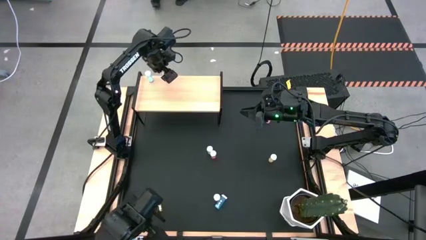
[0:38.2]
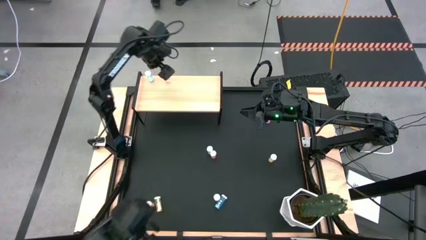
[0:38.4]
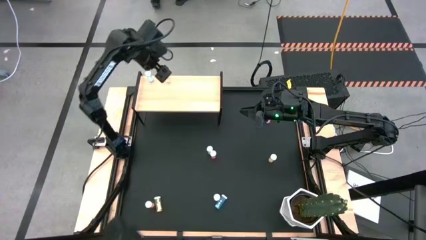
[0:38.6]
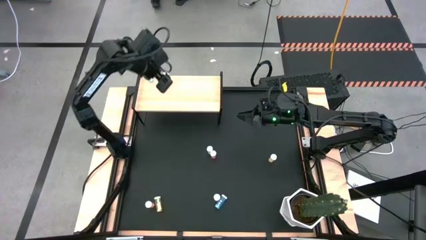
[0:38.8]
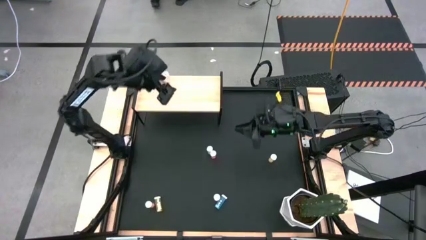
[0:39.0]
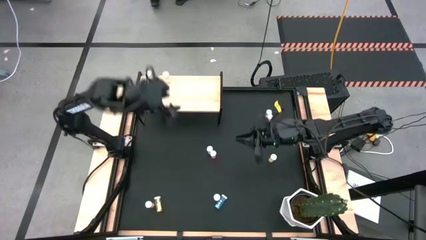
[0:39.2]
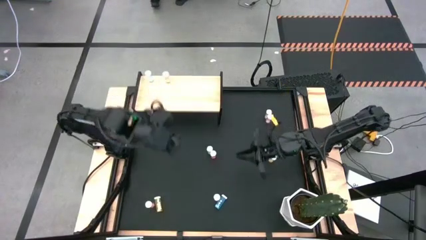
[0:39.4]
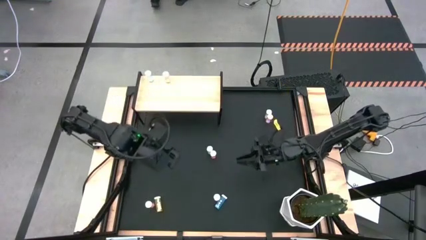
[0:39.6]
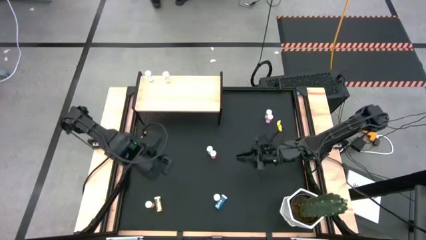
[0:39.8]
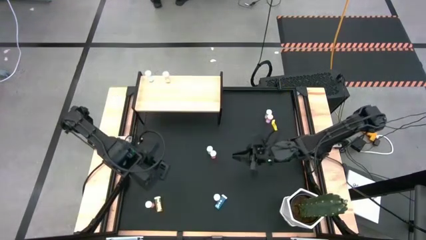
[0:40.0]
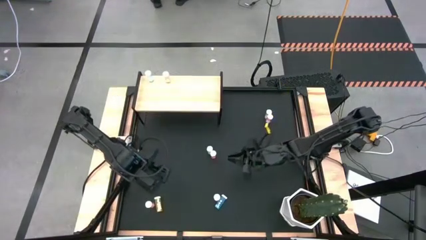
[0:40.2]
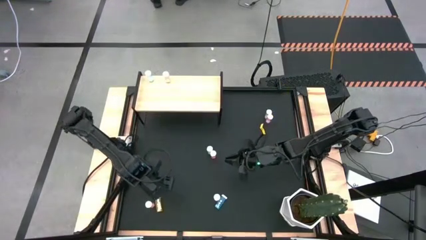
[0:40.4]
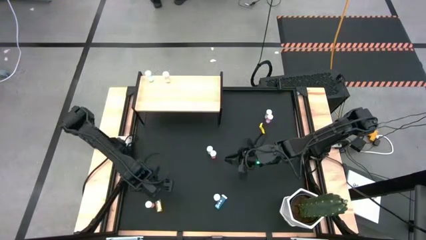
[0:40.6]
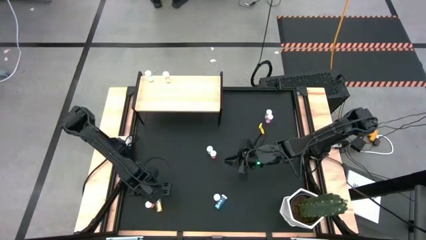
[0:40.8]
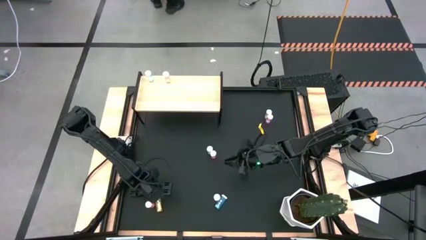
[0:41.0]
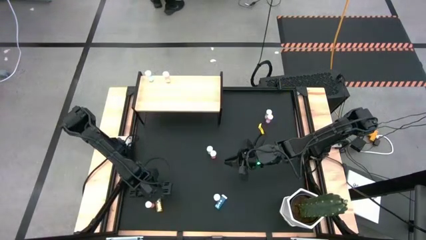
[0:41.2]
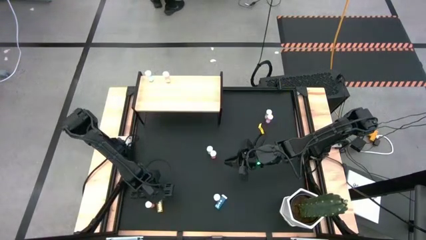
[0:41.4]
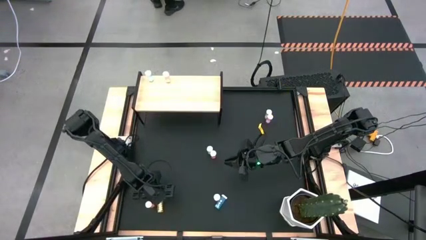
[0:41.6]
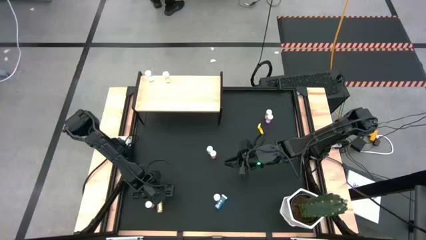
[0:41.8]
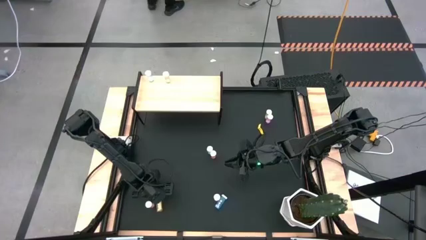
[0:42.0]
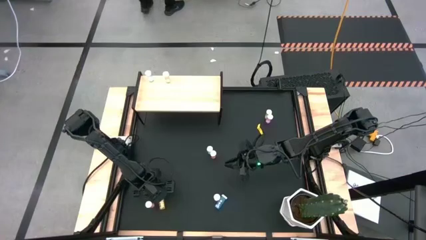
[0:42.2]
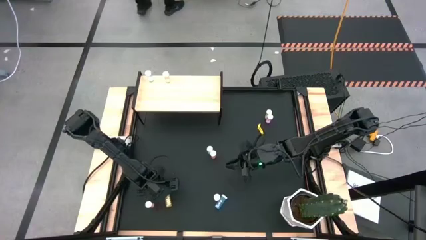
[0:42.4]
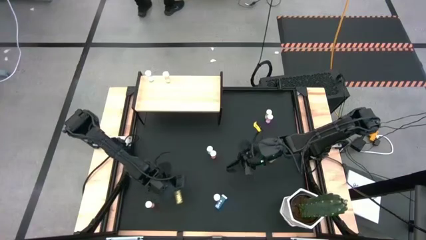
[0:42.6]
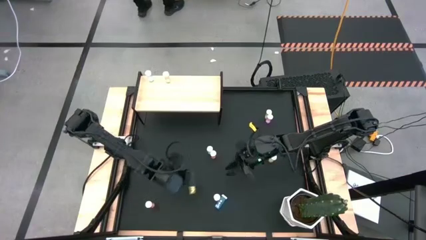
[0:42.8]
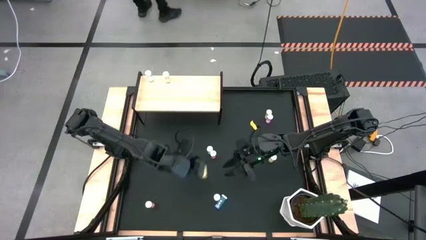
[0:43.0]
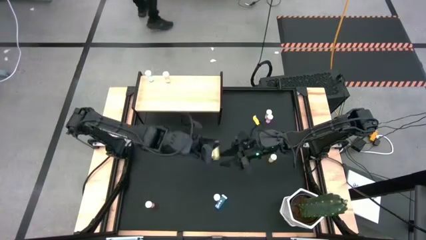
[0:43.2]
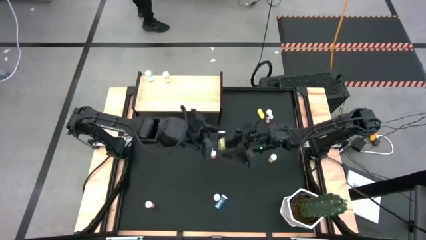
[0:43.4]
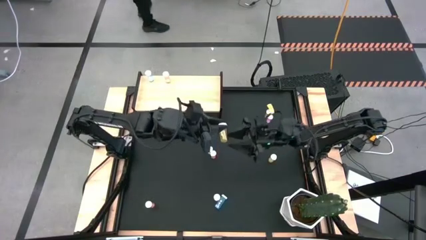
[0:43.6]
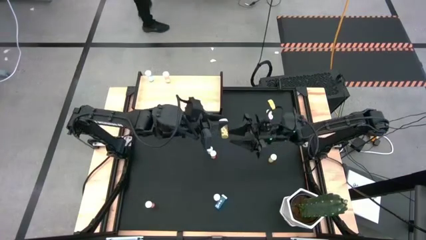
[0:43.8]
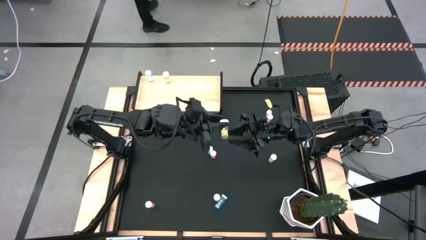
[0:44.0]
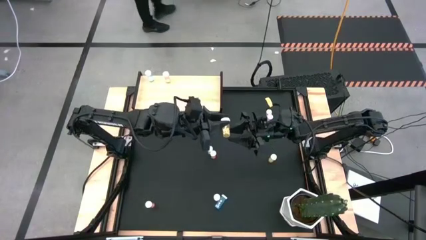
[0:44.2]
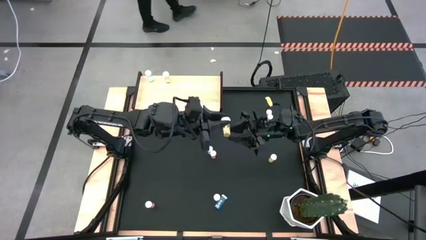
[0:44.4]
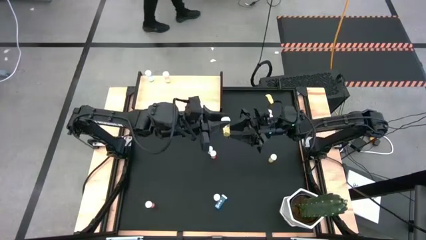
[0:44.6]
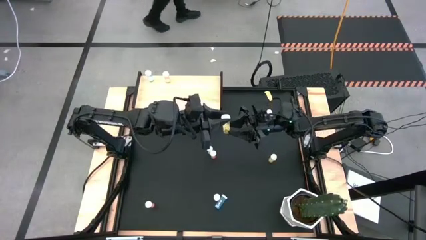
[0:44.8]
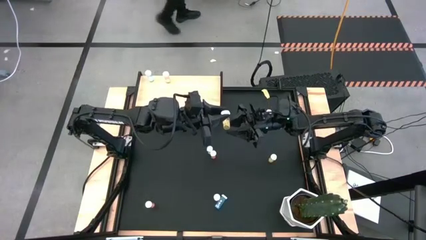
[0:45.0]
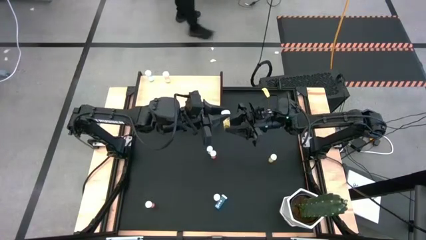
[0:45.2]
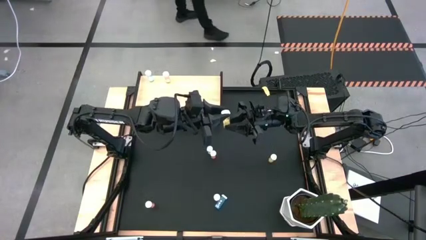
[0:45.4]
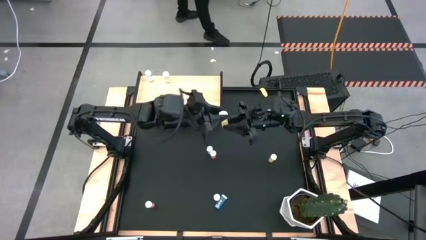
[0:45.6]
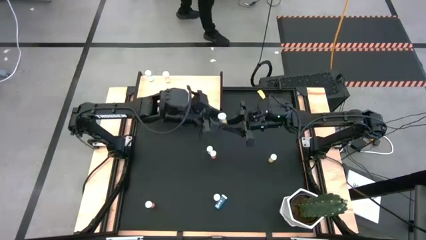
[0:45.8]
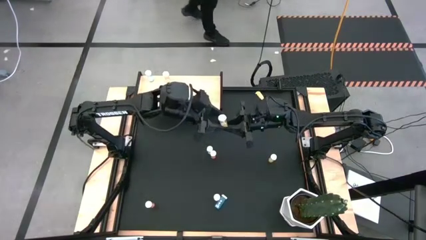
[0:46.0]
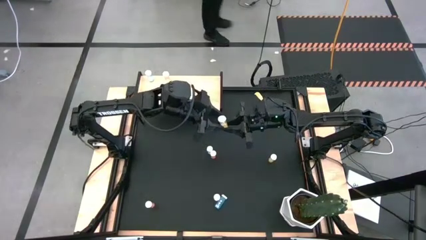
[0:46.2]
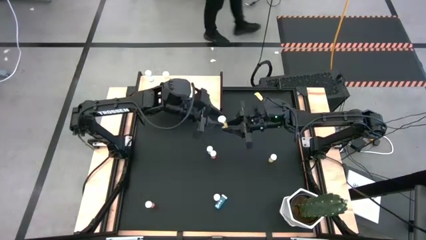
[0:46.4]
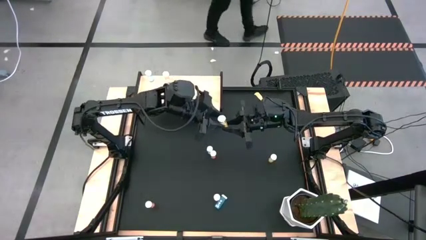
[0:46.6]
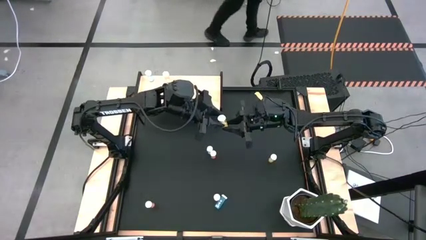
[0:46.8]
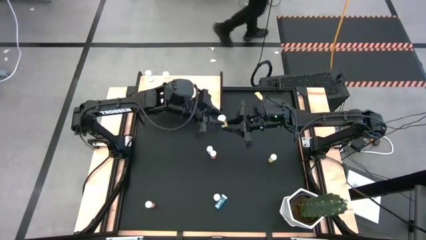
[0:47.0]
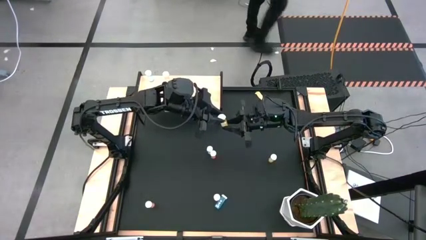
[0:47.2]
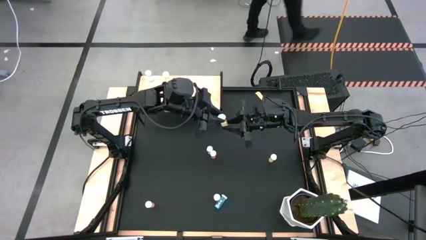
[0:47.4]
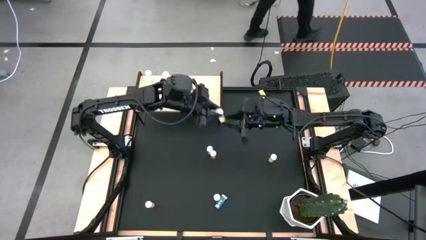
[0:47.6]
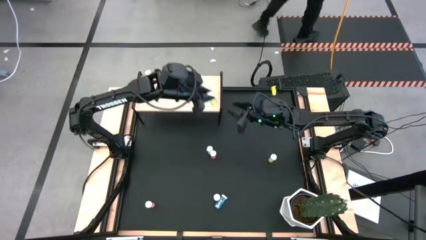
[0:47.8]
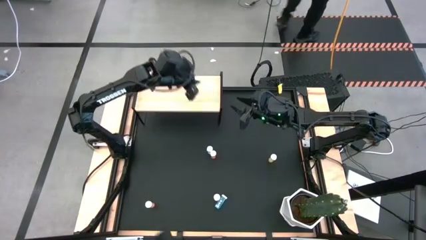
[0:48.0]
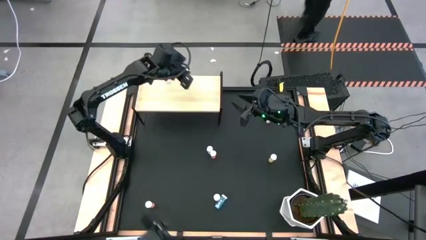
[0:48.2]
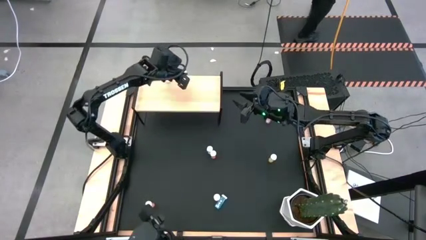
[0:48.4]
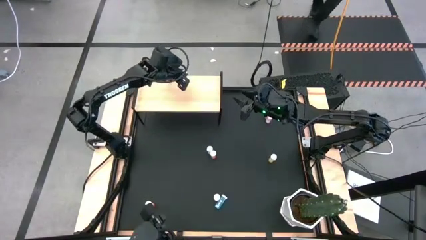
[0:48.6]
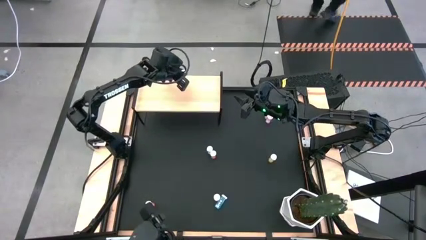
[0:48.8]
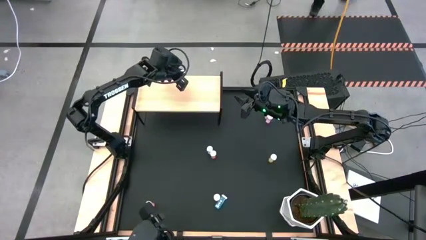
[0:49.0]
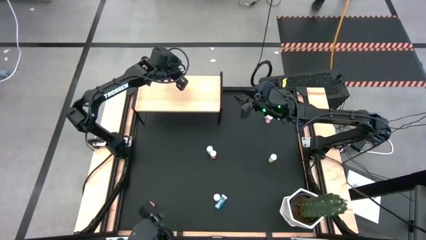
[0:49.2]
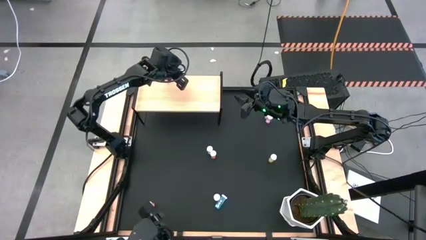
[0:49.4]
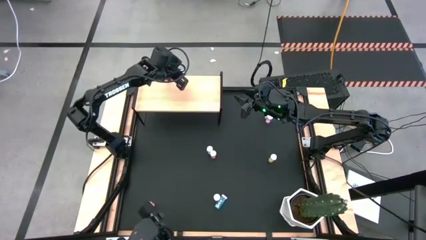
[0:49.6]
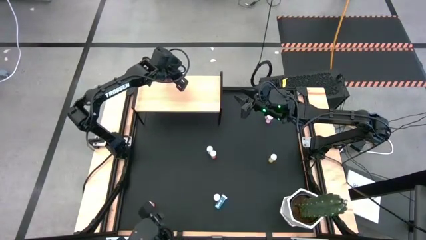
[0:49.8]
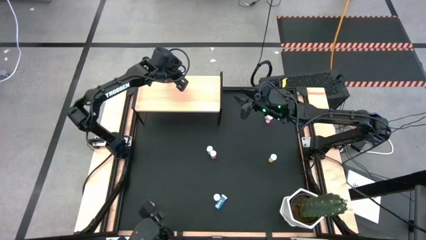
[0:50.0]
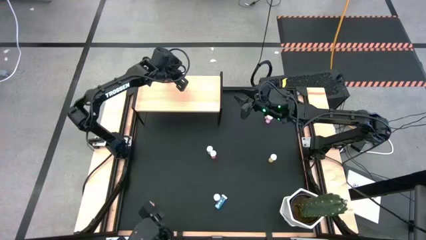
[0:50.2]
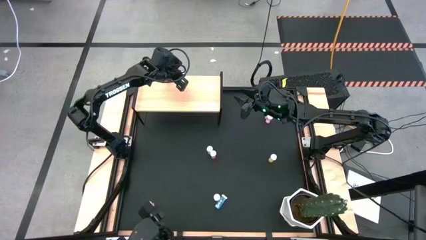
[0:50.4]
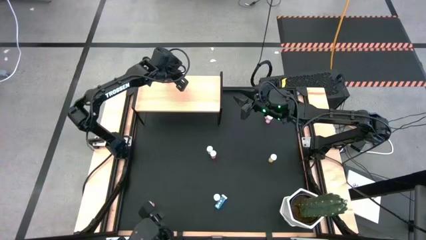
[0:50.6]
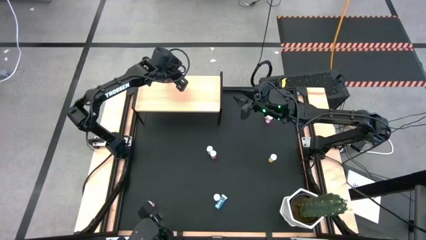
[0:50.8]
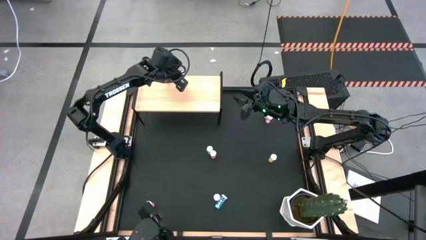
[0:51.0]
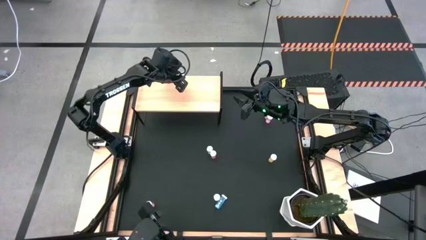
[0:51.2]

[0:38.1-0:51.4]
Task: Pick and place medicine bottles onto shelf by color
Put the bottom yellow pill bottle on the shelf
